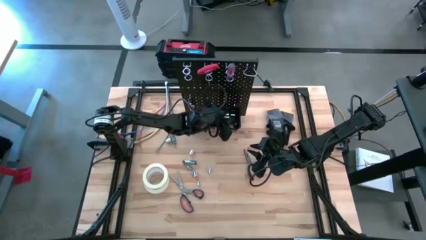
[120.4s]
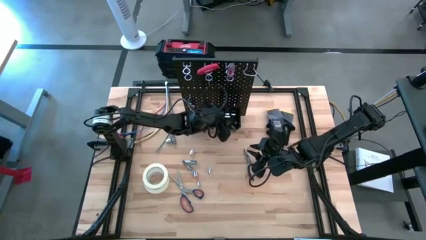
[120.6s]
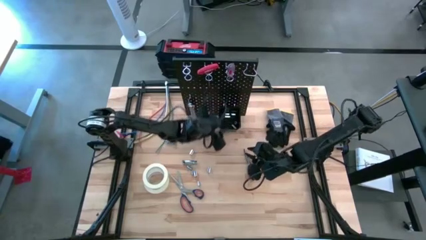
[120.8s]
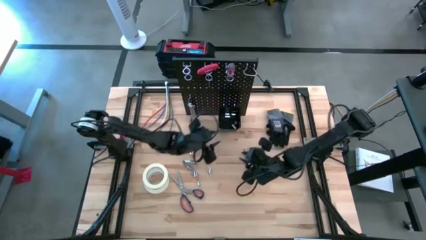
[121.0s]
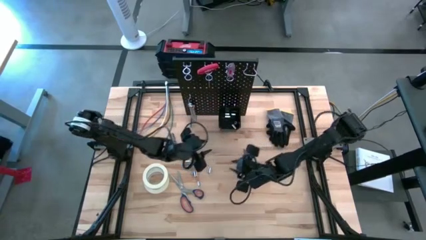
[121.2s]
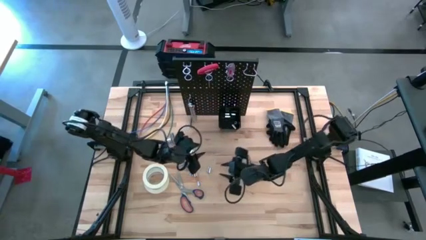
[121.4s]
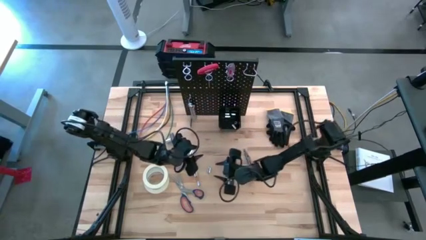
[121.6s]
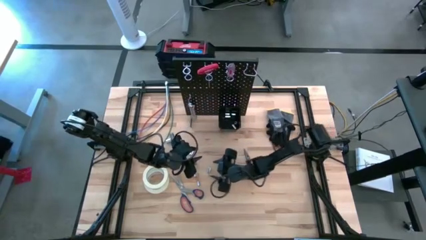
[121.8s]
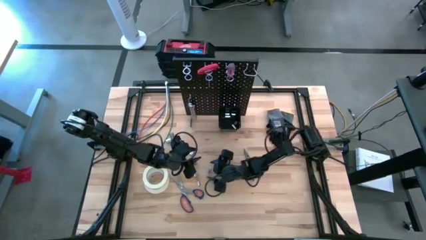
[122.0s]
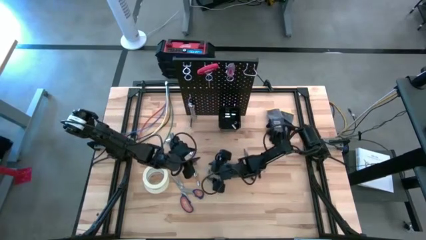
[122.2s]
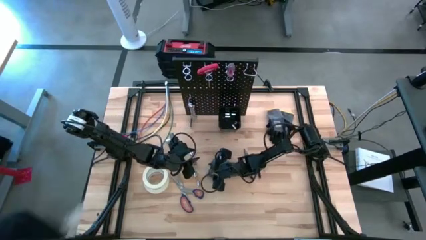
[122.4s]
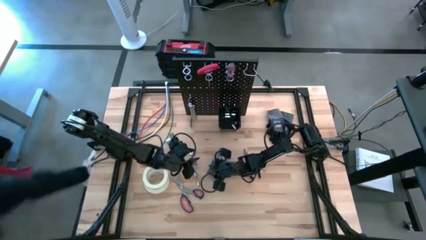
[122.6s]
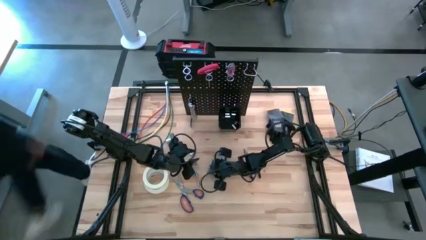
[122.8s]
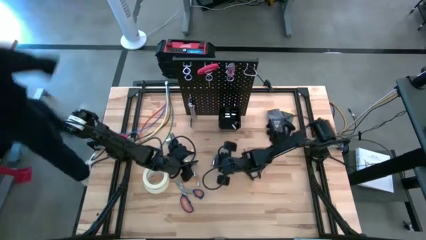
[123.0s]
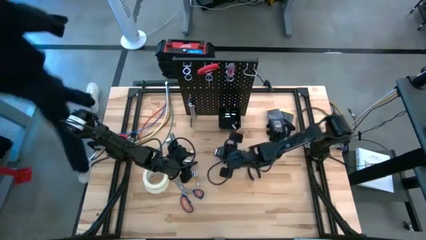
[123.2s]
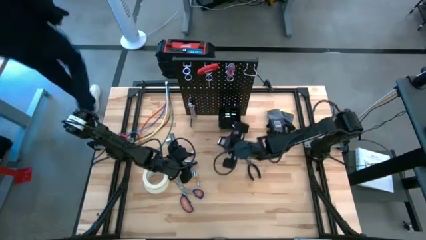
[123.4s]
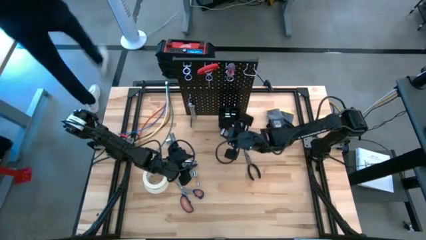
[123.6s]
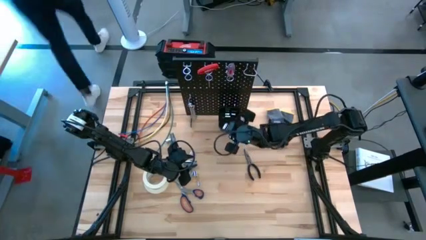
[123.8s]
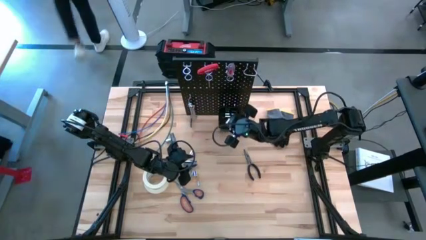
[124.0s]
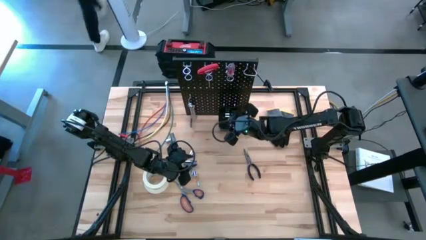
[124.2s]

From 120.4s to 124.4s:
Task: Hang tools onto peg board
Put the socket into the black bin on the peg board

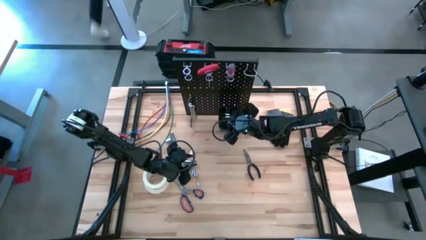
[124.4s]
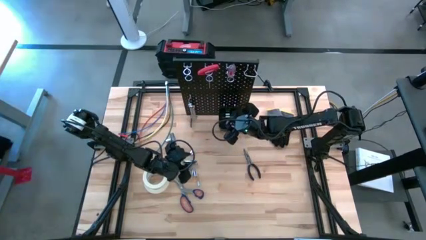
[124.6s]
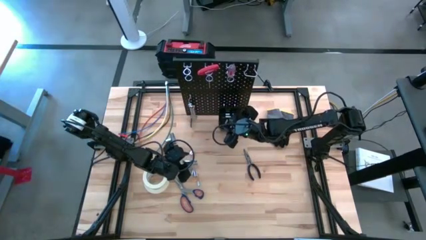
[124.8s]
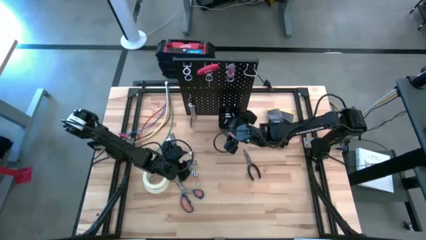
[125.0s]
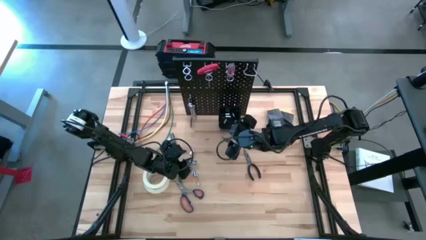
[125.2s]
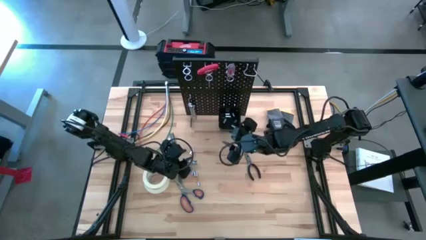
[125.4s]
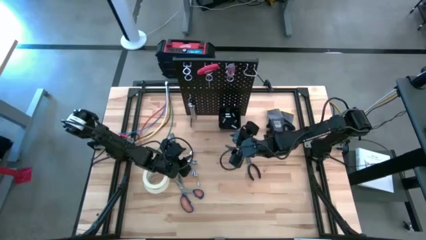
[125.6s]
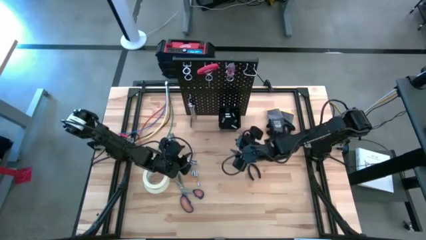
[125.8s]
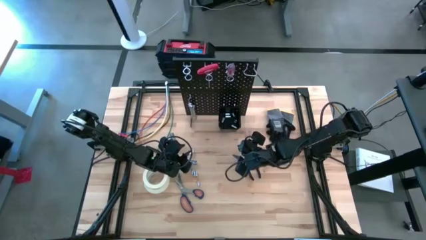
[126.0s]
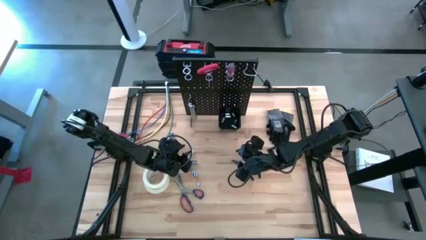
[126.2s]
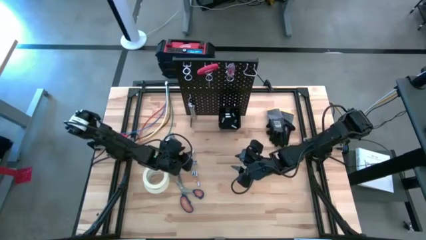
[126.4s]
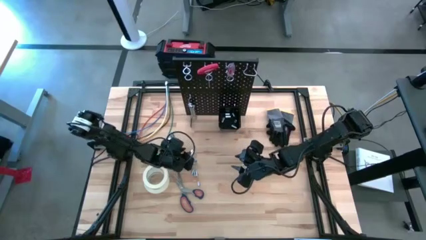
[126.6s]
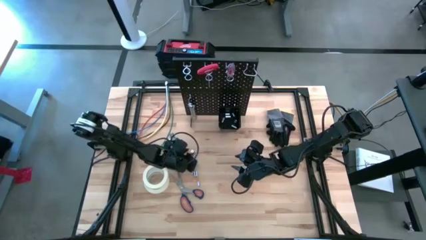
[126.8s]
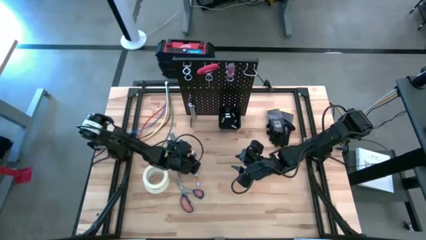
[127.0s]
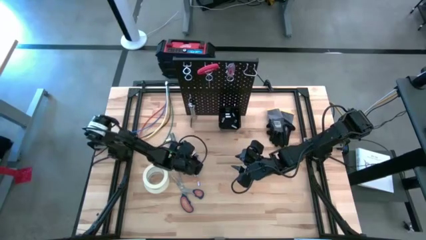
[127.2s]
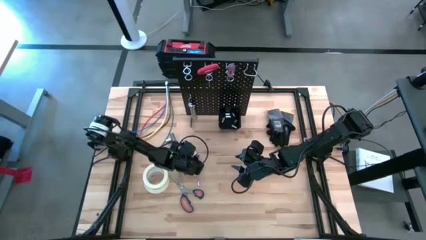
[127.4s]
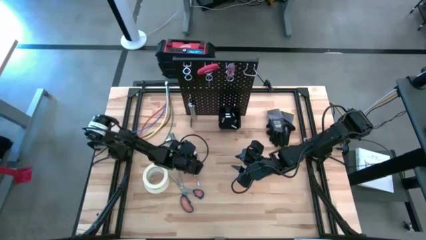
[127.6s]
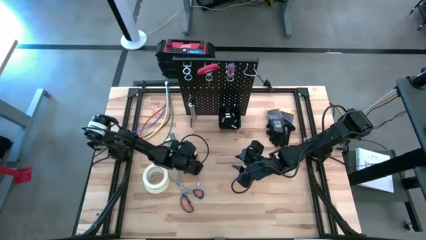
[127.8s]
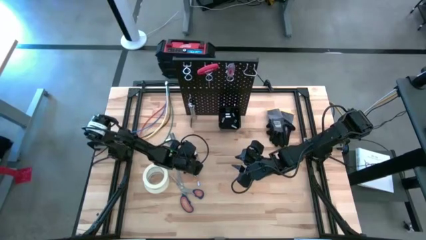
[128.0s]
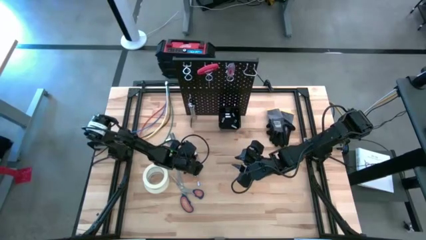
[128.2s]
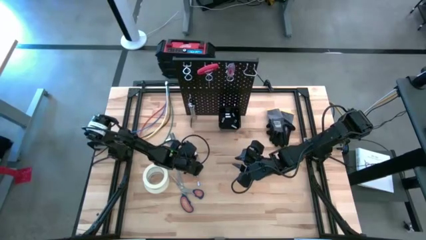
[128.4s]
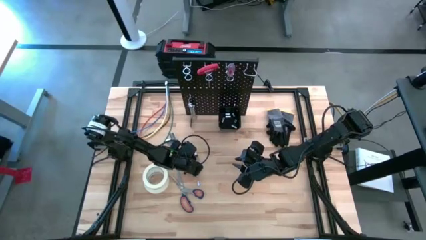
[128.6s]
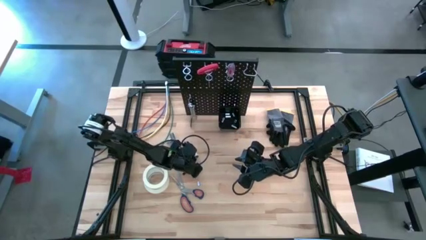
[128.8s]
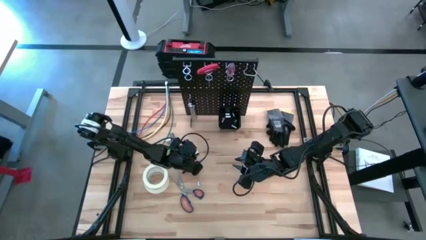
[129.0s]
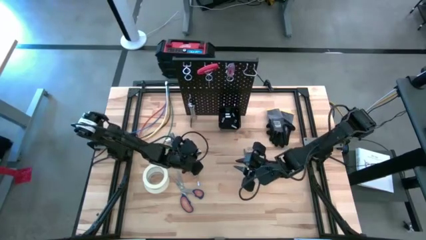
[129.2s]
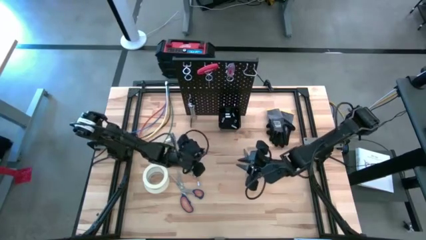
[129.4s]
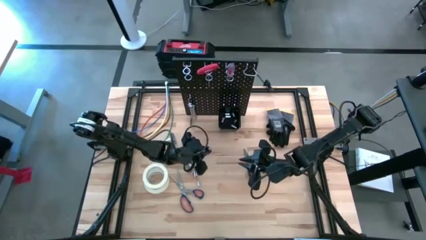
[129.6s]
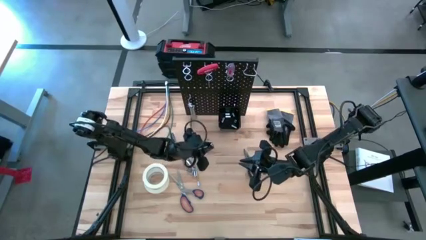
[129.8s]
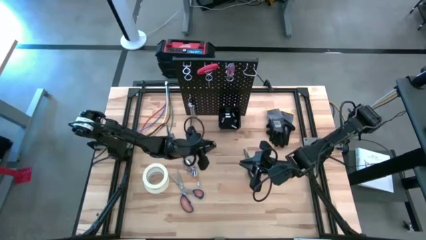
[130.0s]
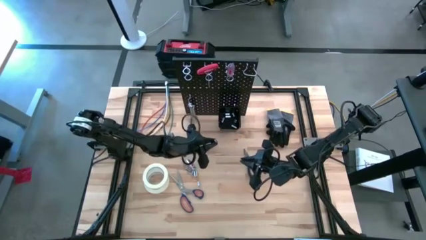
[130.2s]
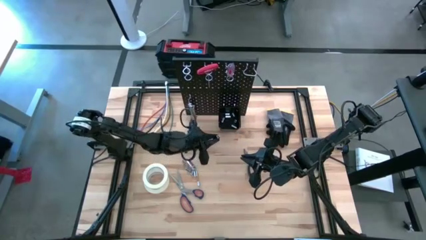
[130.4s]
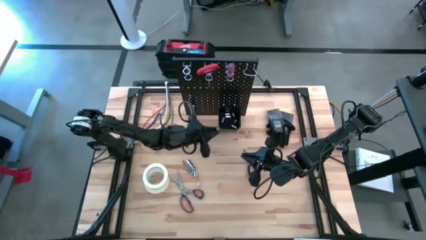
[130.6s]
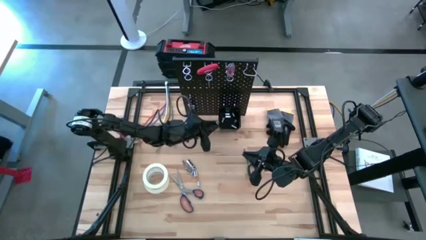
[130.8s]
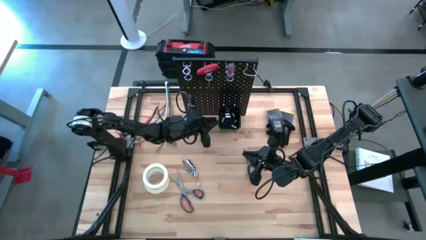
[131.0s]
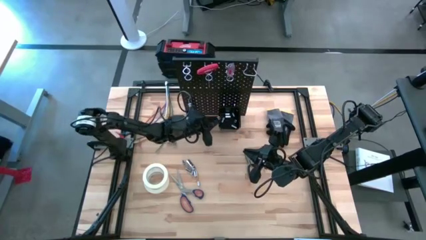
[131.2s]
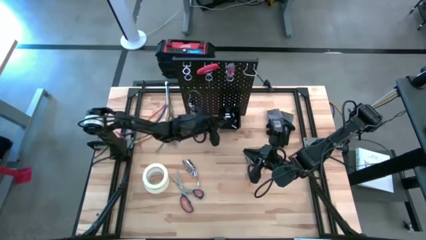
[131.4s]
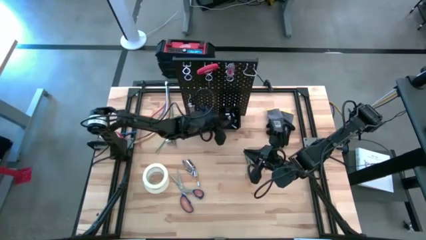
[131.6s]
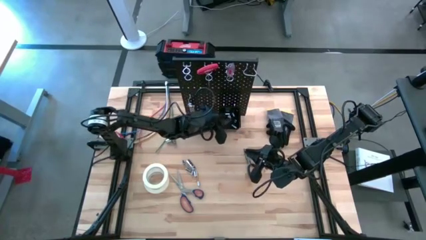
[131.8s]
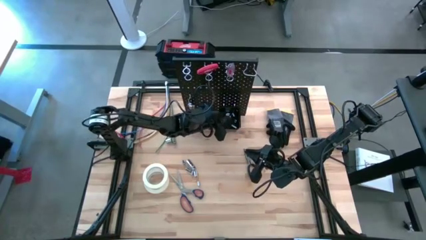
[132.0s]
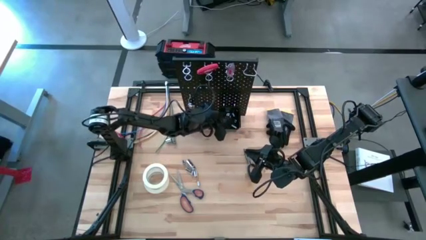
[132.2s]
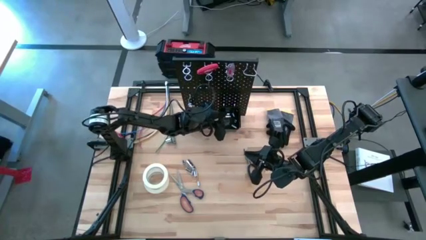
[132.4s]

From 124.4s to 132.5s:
Put the socket into the black bin on the peg board

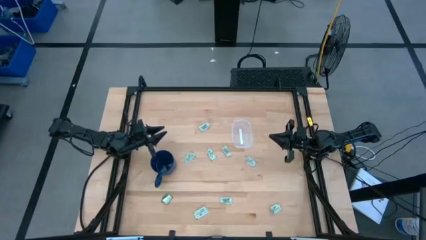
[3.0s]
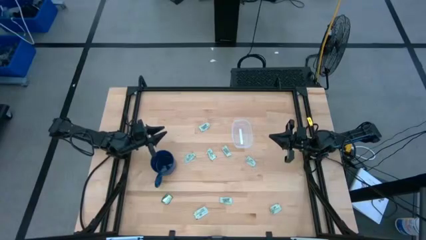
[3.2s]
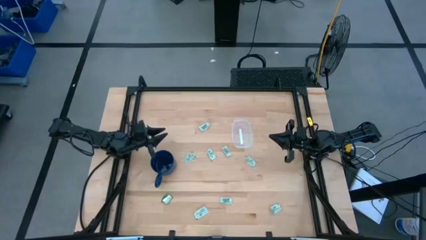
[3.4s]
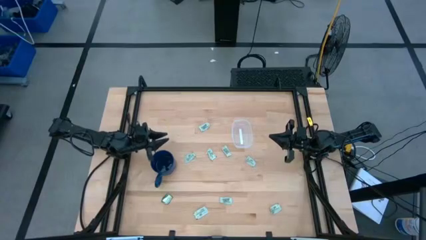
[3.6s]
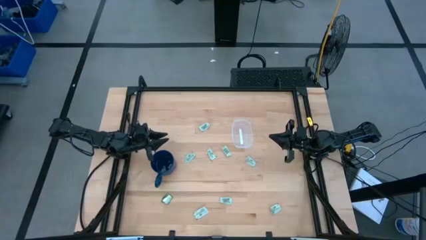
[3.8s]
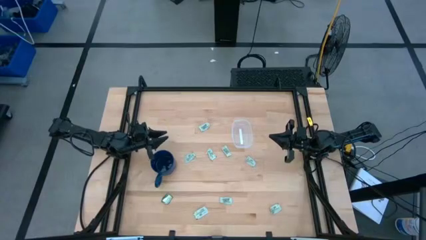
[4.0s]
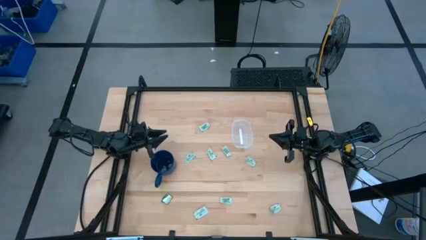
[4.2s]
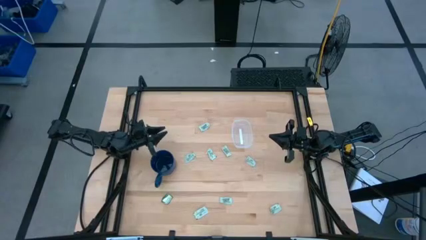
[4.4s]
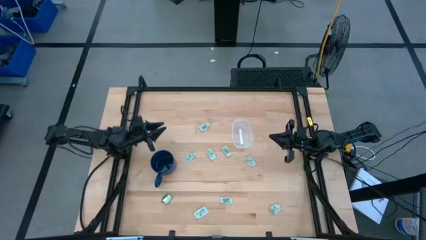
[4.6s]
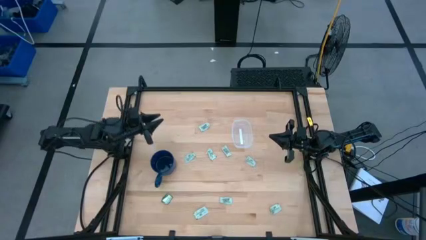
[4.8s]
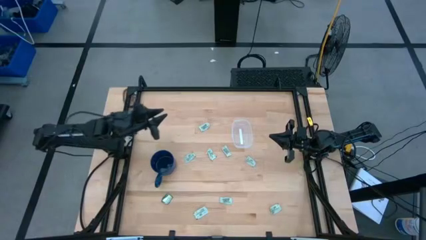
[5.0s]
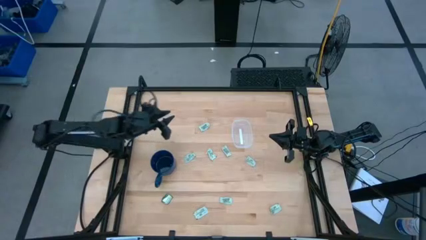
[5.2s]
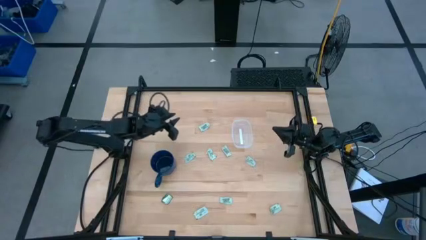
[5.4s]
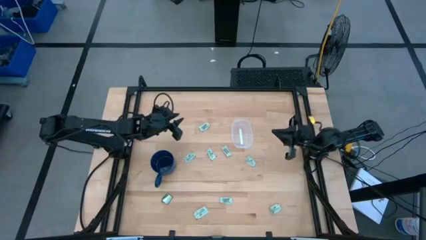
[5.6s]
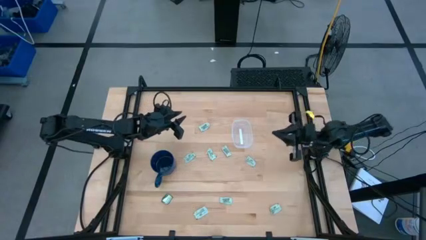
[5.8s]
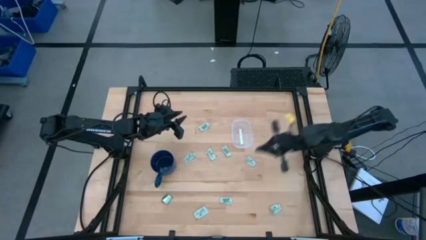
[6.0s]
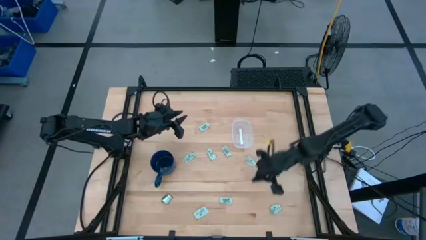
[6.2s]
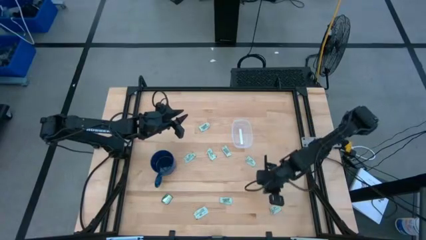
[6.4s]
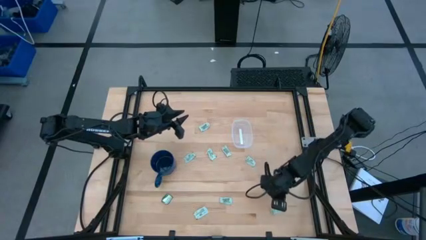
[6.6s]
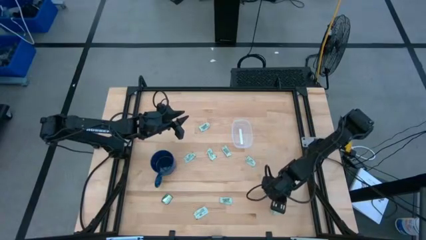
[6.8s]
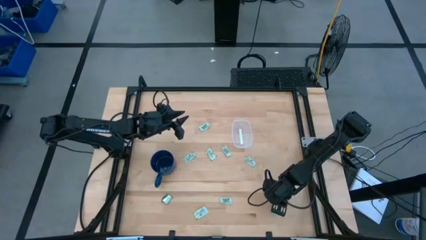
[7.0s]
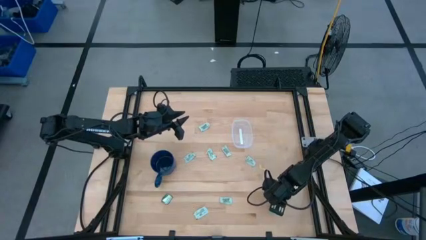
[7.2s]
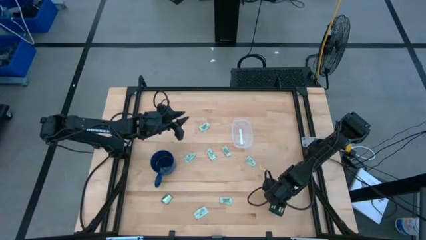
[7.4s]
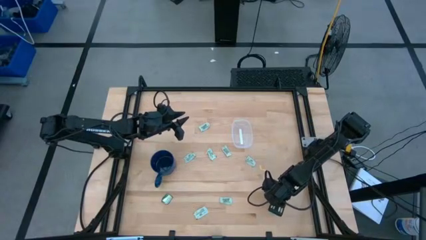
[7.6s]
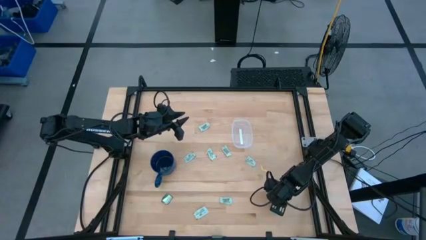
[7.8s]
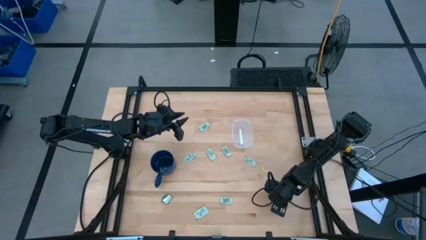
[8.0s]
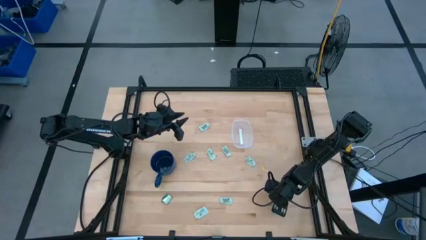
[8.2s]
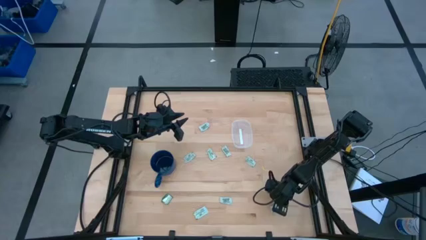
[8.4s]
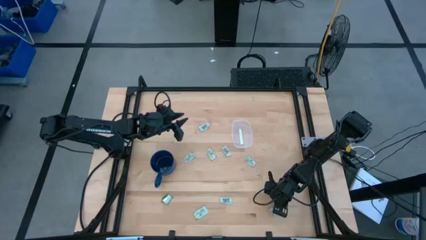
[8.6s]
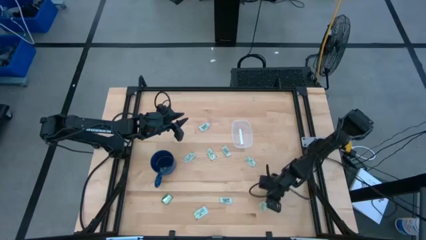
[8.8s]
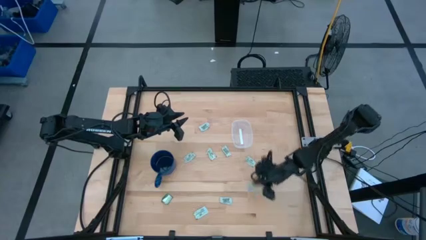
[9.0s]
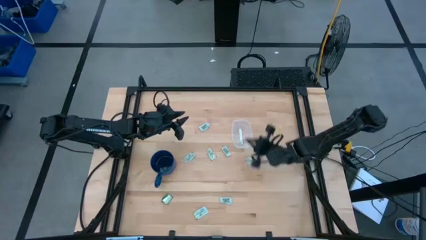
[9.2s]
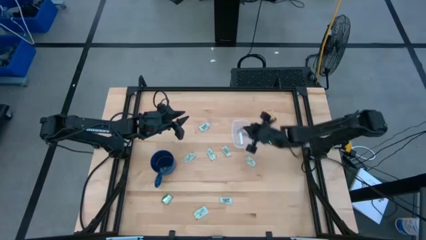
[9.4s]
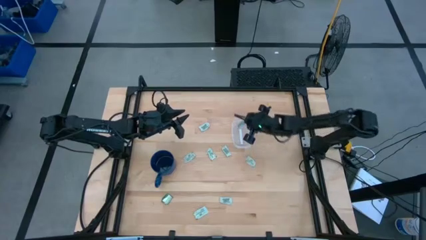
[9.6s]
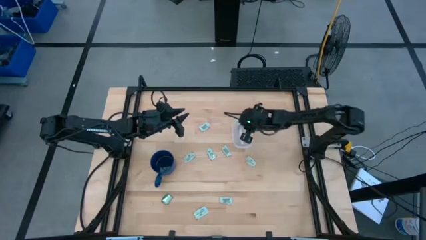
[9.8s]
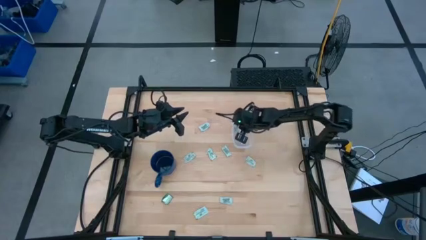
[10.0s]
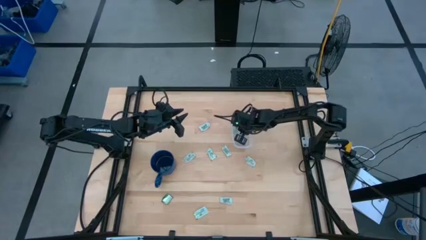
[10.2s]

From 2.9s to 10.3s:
Task: Pick and place Stevia / Truvia into bins
Put the light green stevia packet into the transparent container
